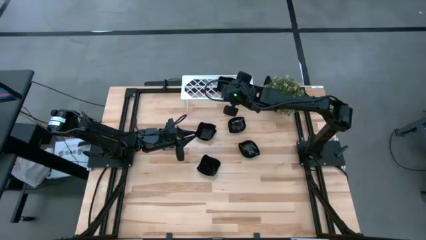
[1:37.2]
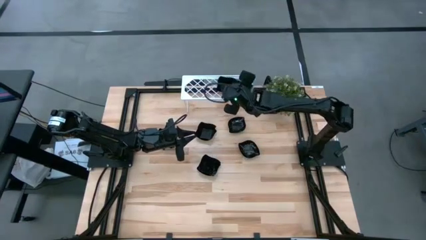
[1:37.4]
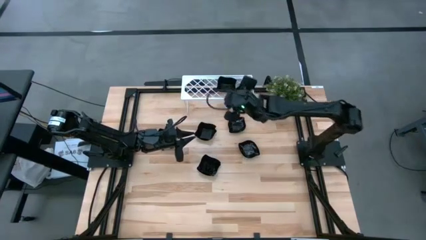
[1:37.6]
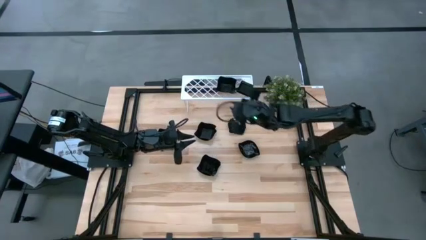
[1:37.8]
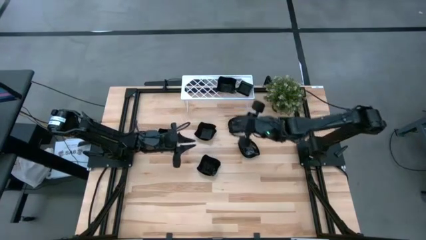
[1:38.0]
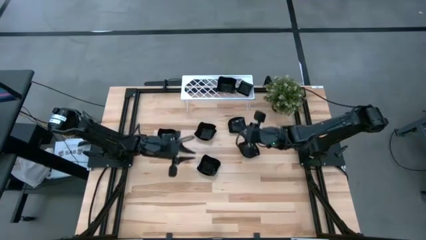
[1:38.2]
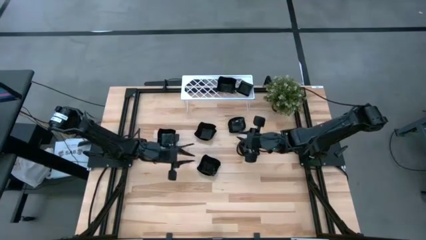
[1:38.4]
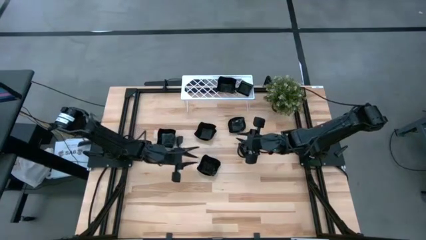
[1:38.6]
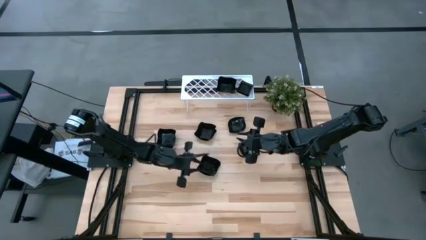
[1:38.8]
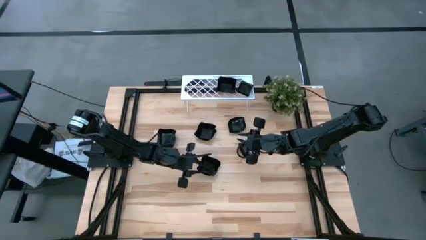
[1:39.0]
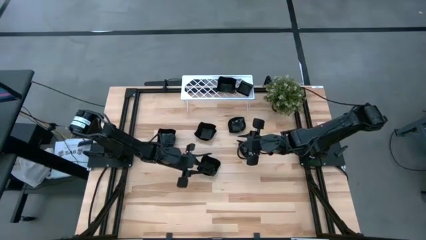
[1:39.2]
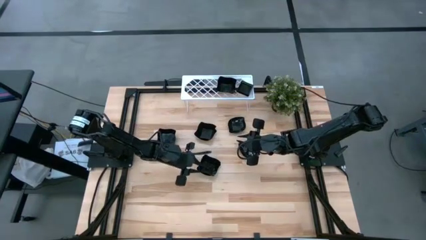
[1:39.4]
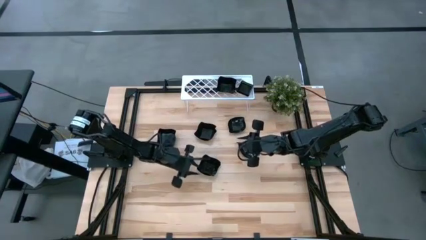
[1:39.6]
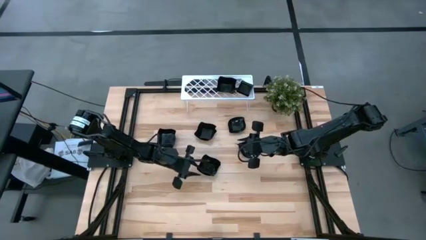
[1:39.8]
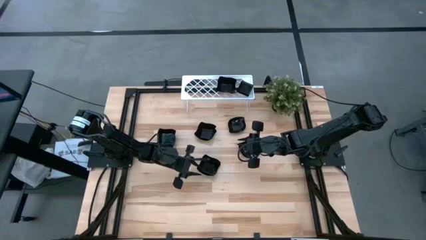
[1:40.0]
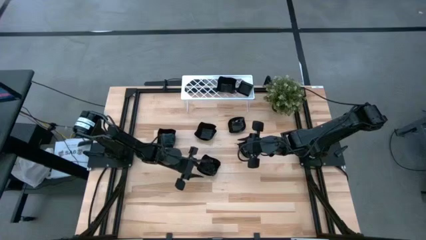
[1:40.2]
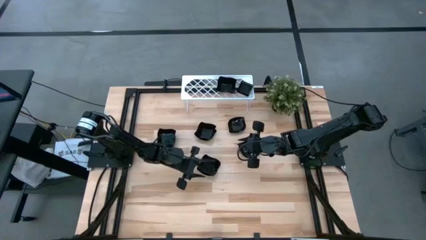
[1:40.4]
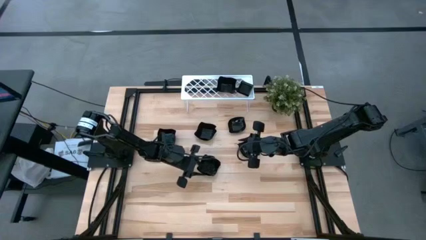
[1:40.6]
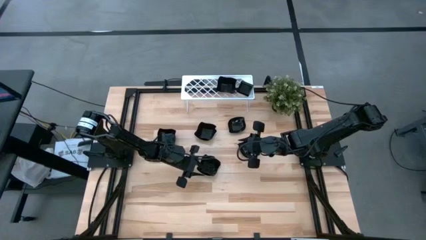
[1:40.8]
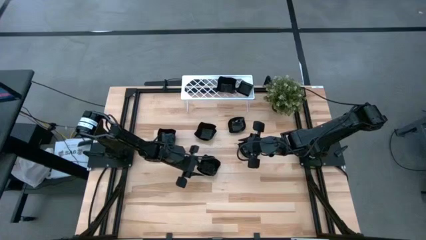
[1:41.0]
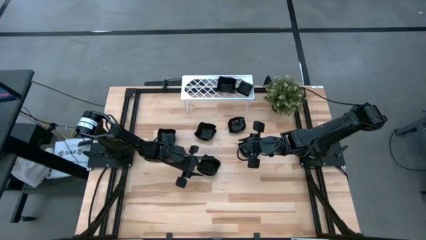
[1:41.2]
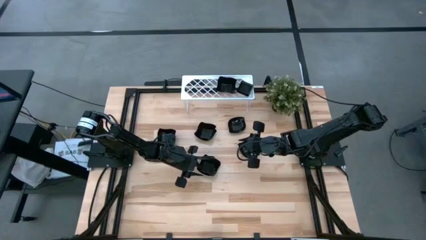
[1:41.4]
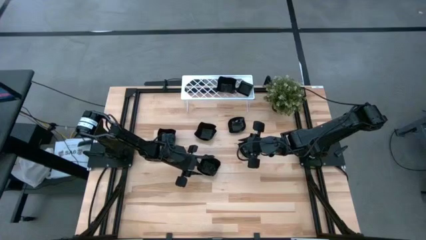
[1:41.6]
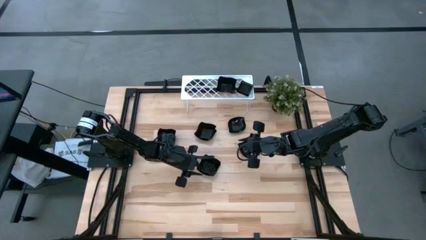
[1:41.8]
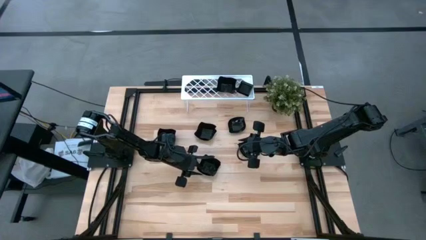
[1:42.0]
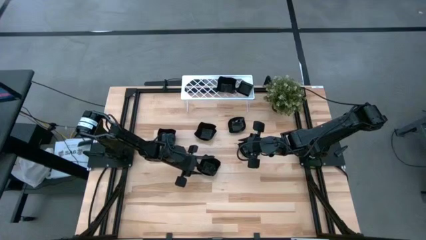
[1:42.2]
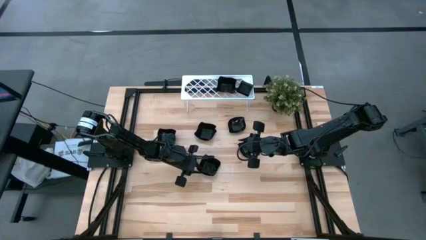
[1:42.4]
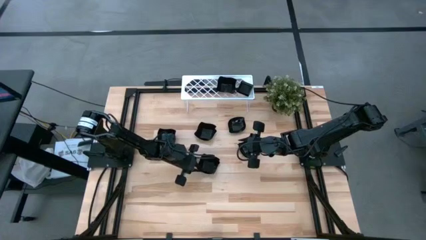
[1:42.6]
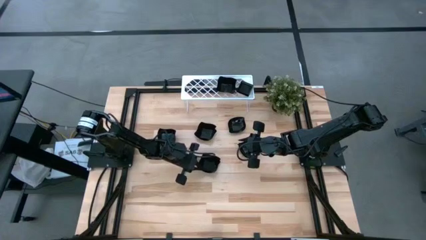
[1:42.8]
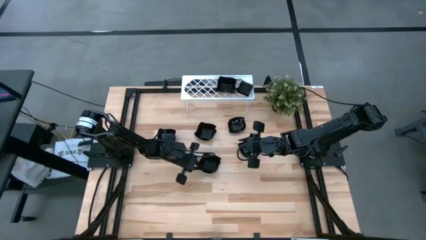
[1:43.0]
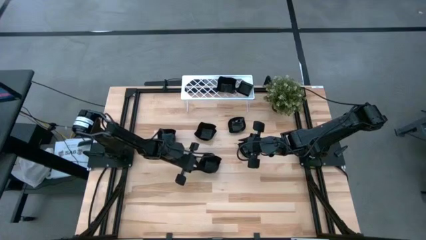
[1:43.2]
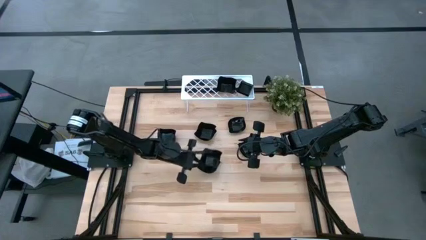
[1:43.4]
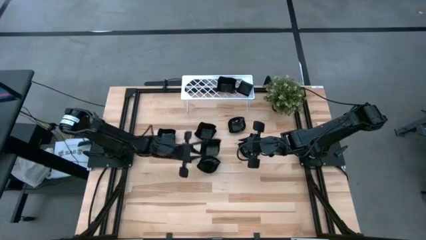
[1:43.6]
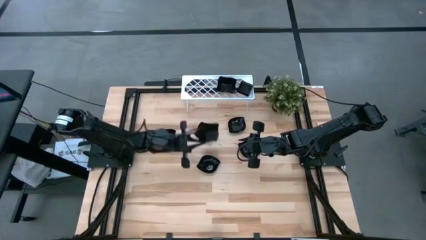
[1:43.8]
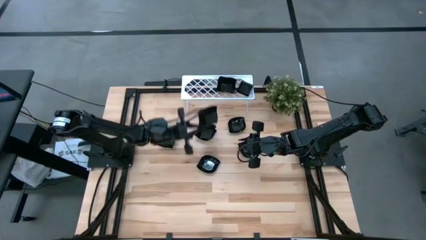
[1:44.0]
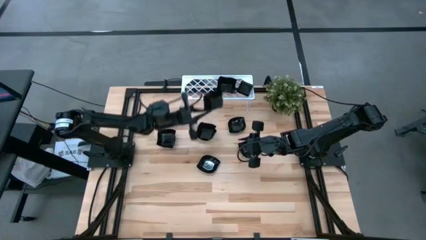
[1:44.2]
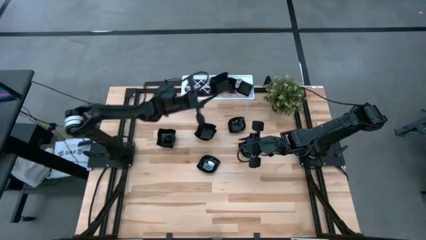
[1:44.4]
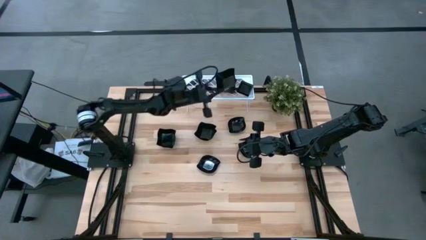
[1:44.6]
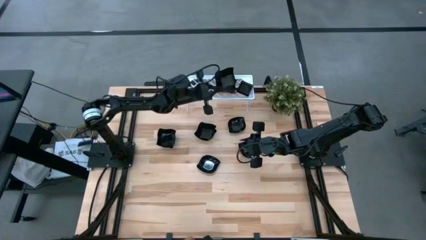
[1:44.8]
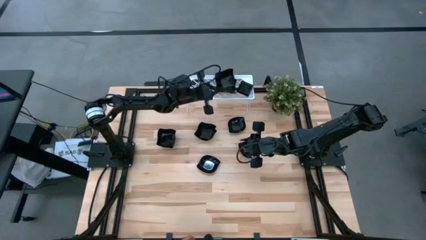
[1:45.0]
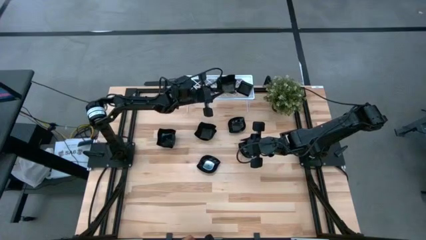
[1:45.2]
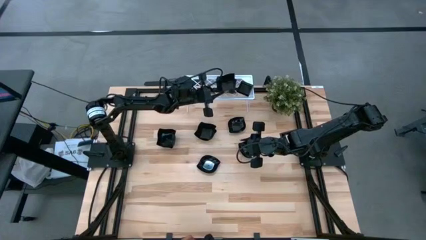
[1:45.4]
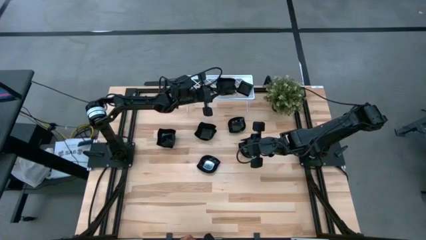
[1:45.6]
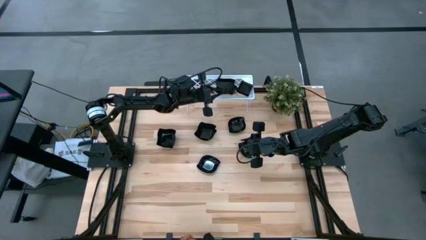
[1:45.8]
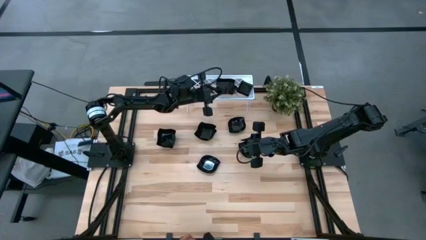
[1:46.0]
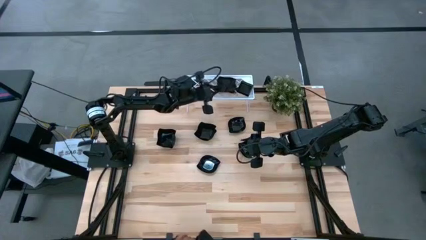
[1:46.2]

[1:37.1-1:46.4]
Task: Pick & Place Mini shaped plates
Stack the black distorted square plate on top of the black distorted square plate on the shelf

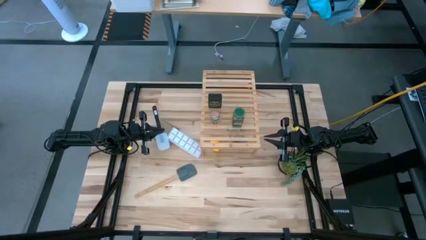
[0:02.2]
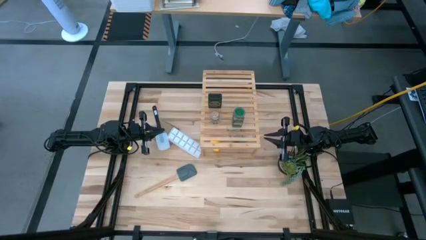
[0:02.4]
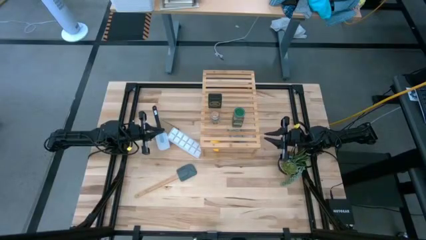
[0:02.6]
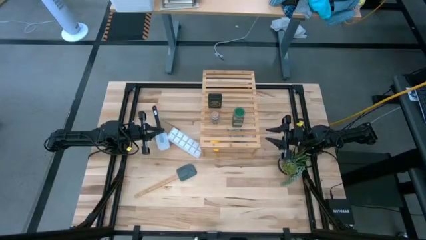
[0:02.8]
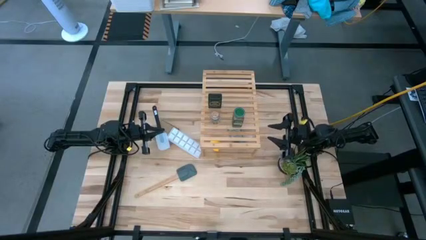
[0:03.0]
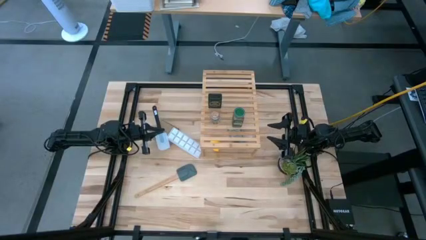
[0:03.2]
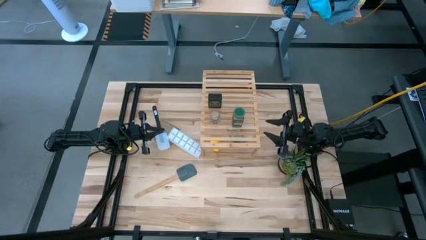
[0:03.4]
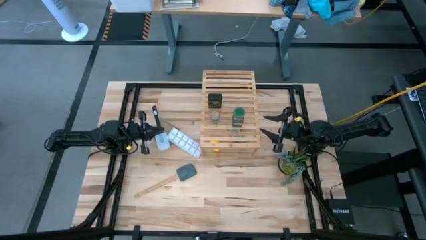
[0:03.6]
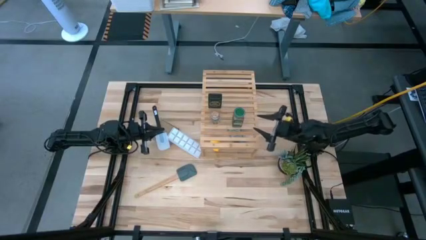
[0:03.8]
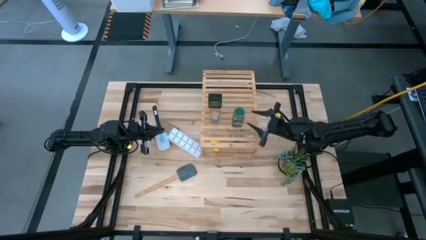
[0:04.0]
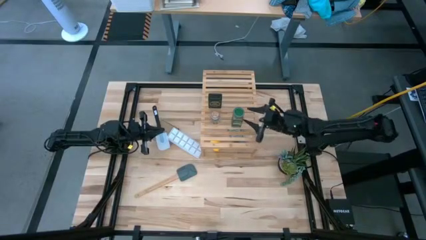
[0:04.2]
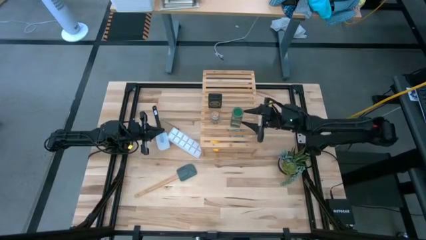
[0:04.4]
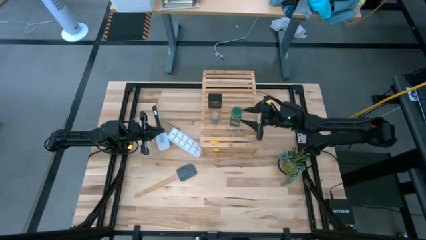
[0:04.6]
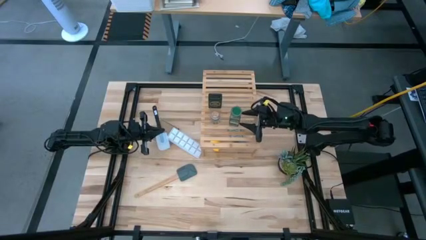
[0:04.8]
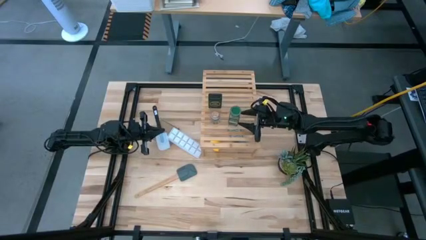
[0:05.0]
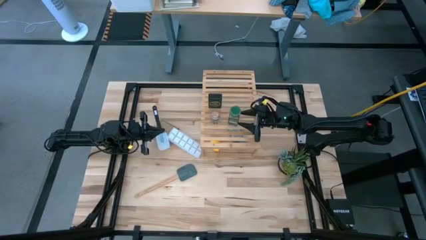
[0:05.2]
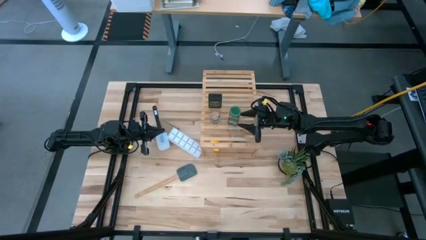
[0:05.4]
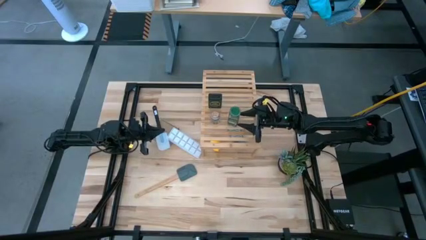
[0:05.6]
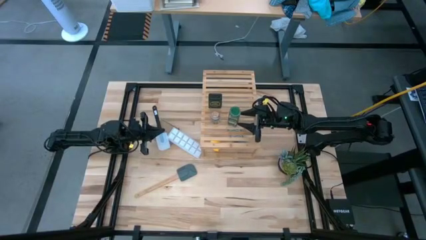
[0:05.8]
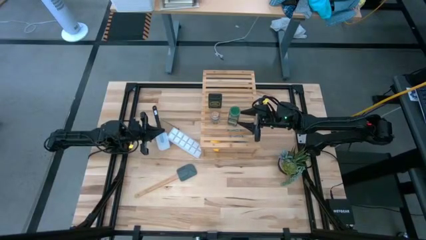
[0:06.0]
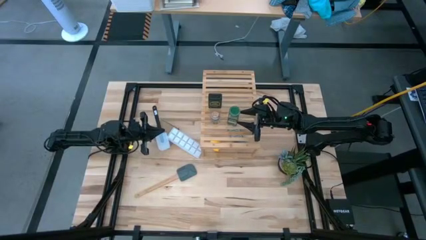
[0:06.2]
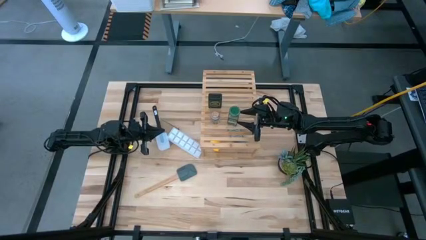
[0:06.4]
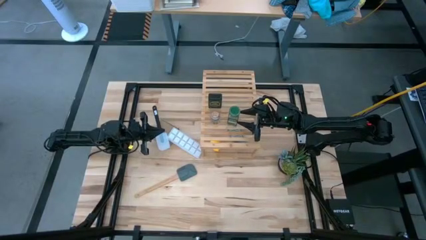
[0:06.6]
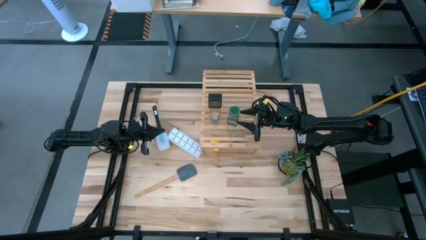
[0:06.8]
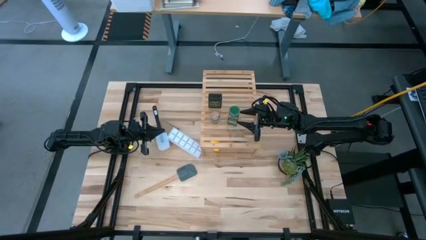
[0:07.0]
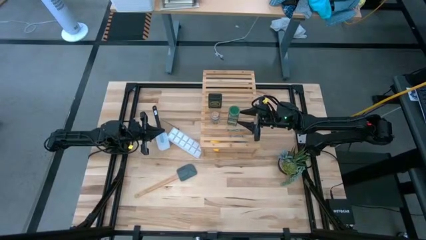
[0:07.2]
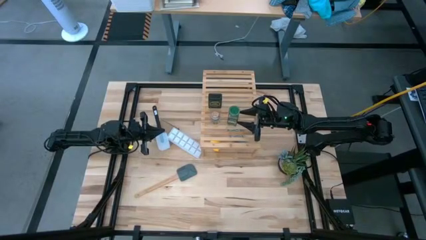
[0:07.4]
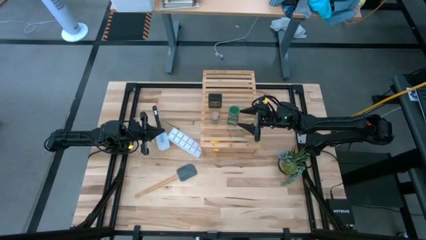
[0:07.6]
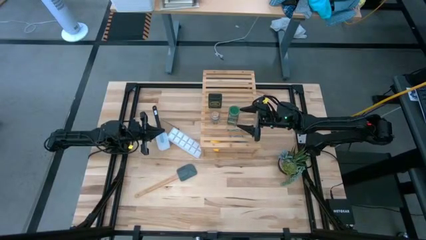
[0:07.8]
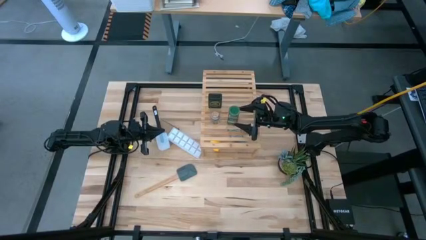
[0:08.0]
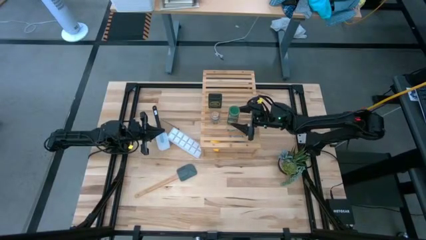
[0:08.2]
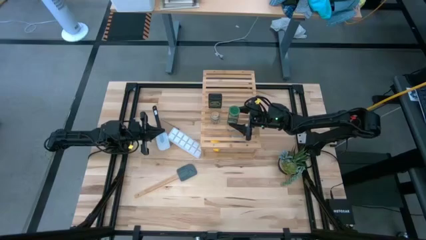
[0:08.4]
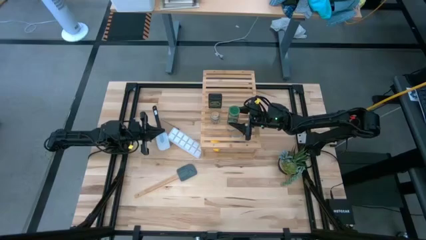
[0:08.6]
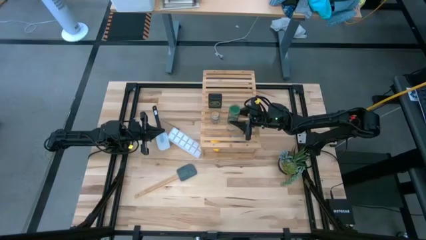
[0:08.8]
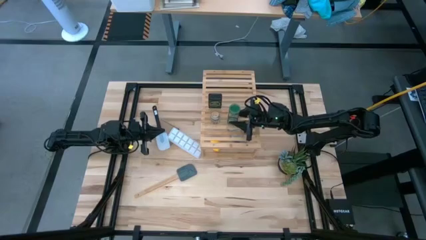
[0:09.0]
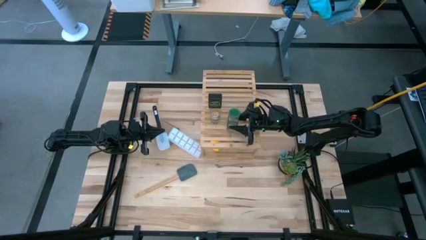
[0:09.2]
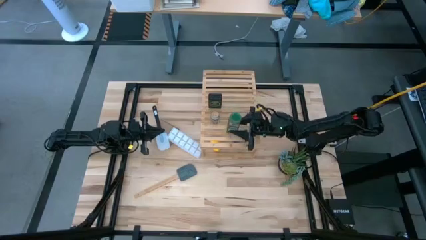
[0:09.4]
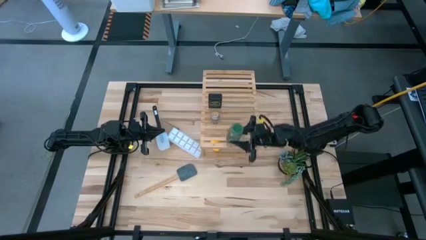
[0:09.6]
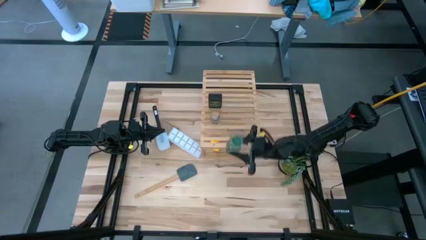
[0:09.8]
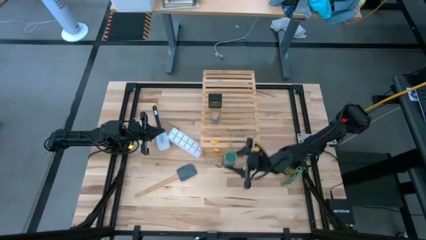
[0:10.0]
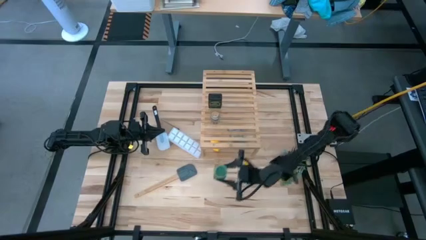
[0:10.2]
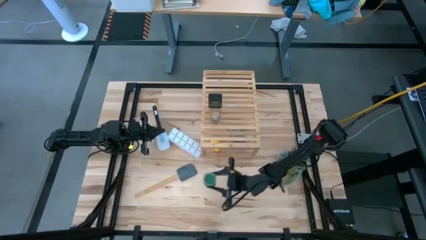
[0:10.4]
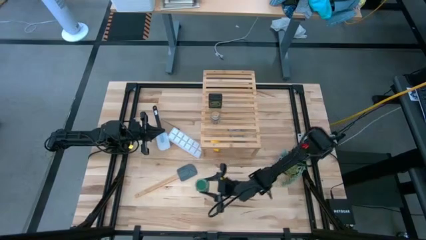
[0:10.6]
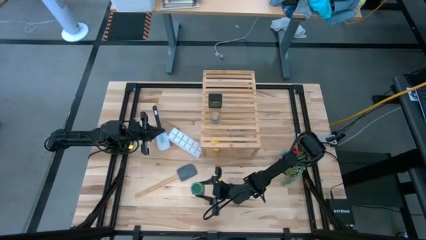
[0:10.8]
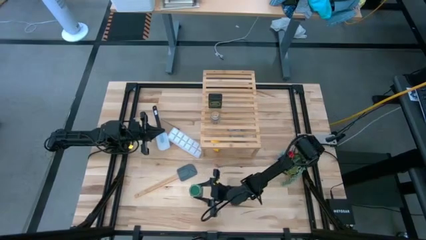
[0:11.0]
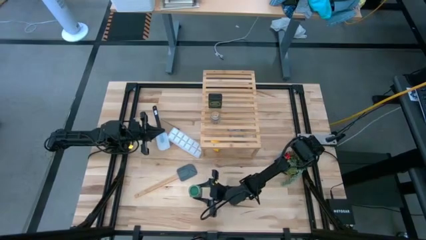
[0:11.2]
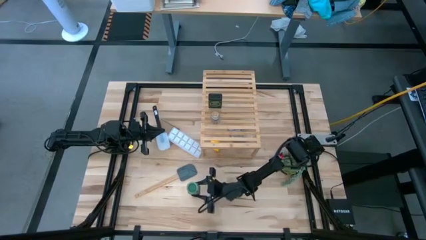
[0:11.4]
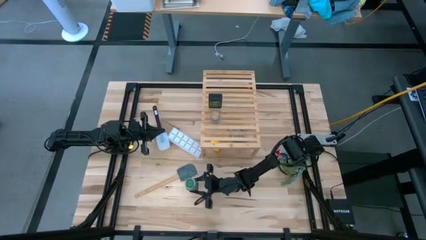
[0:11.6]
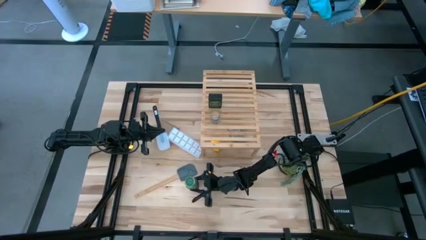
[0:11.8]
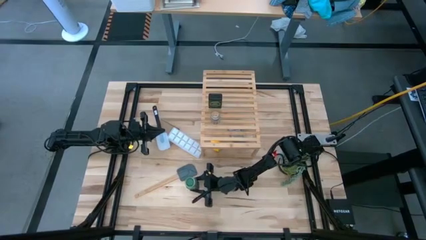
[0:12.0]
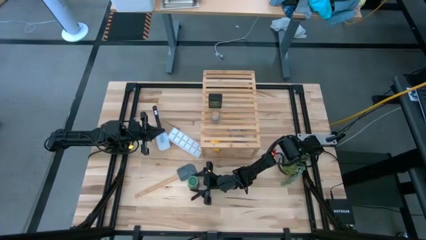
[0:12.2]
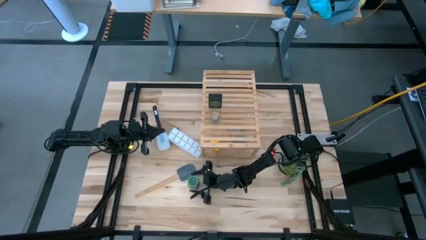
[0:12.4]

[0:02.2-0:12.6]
Task: Shelf spices
Remove the green seasoning bottle from the shelf
